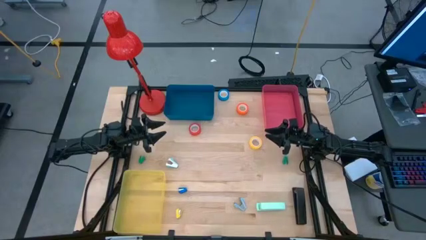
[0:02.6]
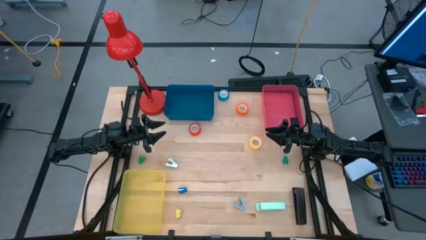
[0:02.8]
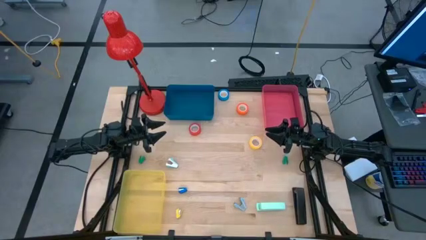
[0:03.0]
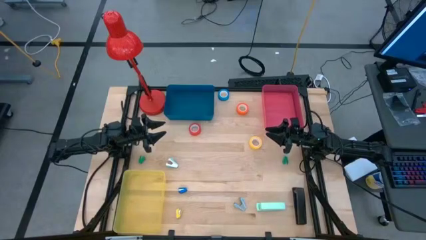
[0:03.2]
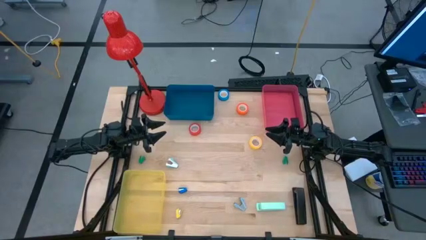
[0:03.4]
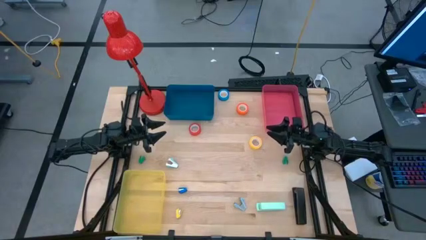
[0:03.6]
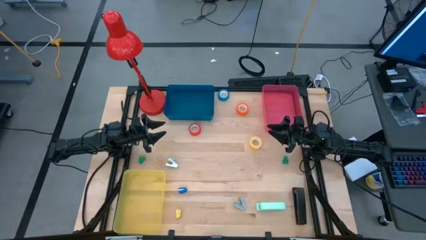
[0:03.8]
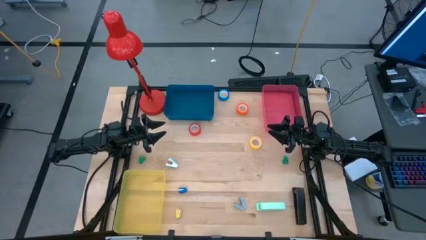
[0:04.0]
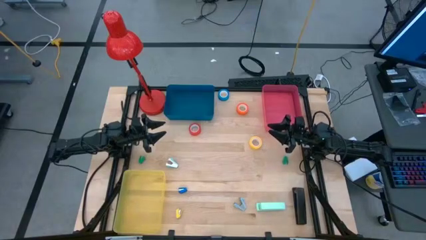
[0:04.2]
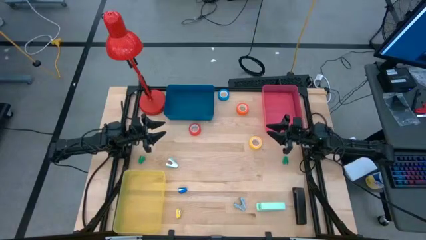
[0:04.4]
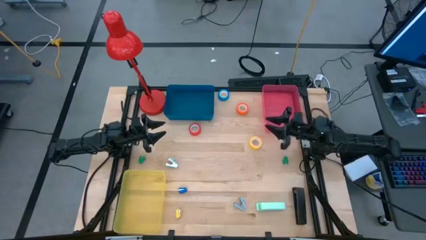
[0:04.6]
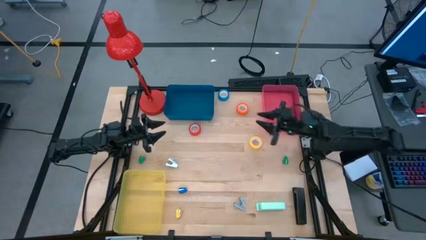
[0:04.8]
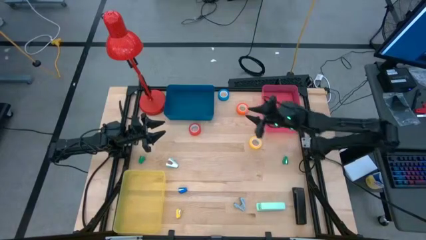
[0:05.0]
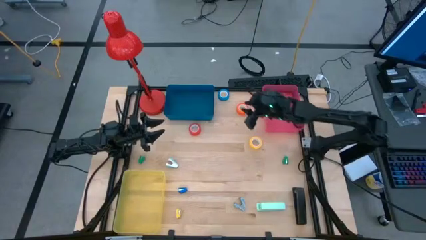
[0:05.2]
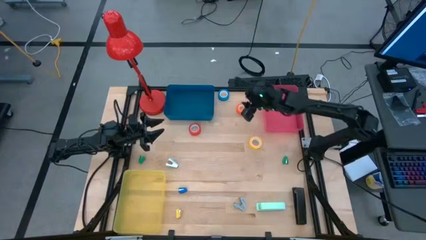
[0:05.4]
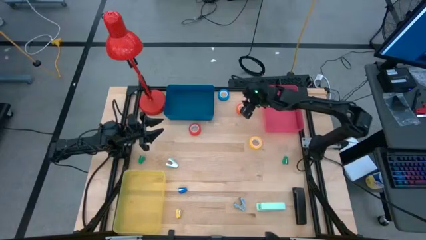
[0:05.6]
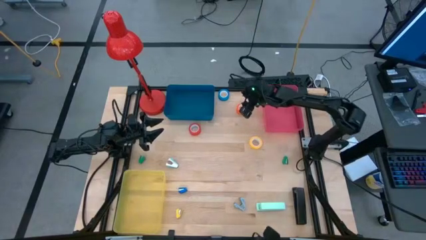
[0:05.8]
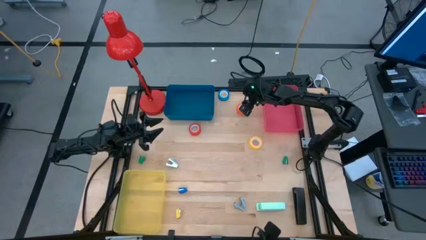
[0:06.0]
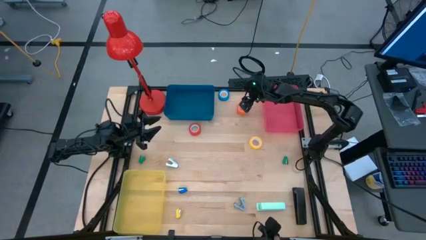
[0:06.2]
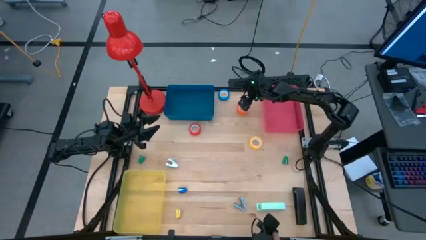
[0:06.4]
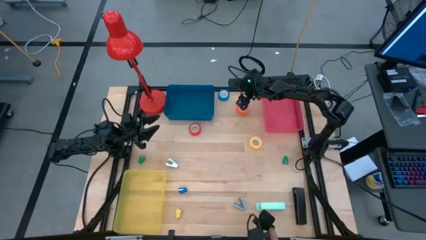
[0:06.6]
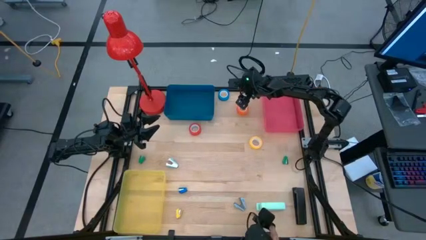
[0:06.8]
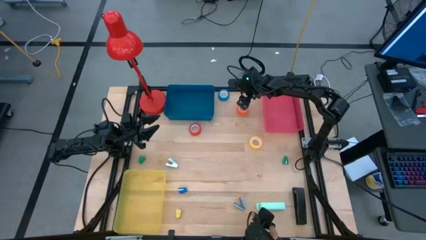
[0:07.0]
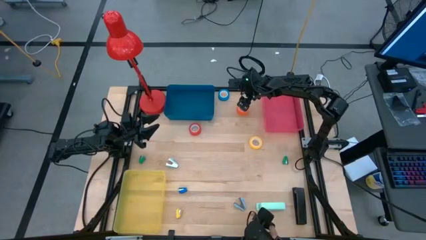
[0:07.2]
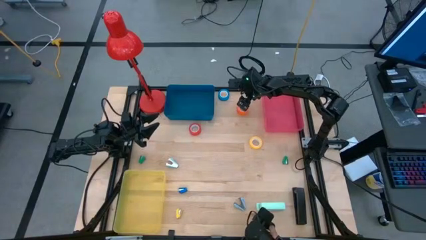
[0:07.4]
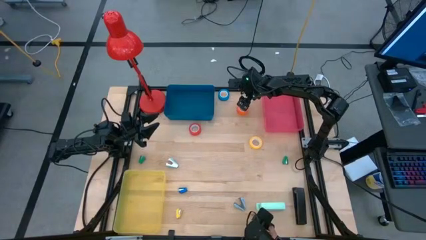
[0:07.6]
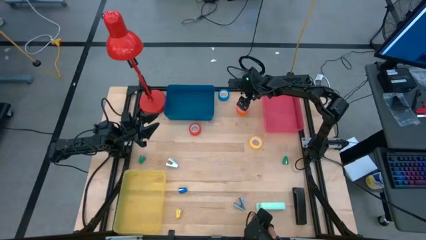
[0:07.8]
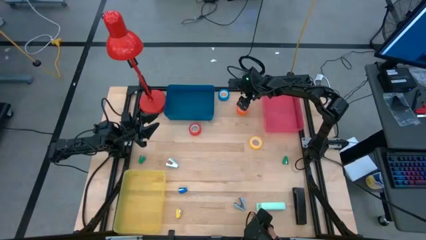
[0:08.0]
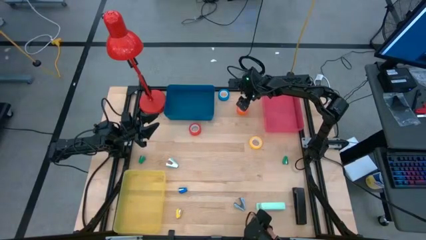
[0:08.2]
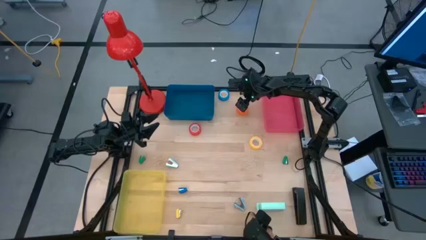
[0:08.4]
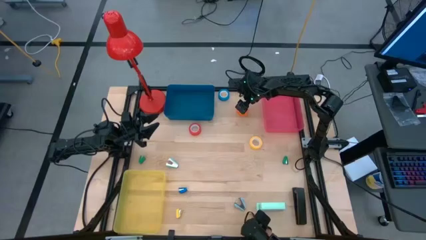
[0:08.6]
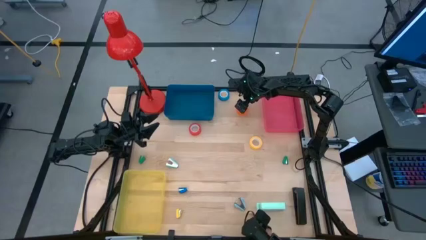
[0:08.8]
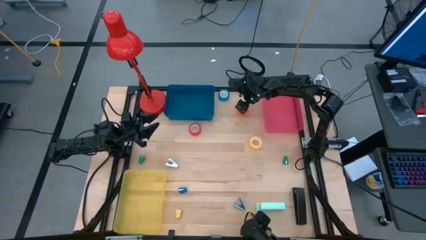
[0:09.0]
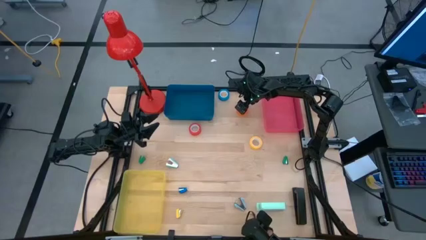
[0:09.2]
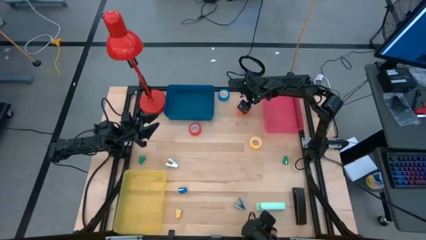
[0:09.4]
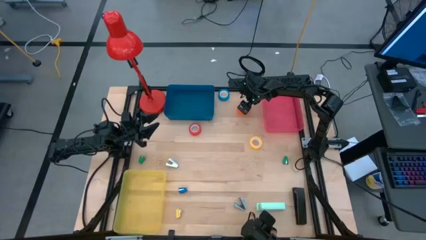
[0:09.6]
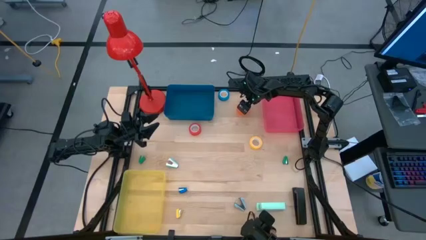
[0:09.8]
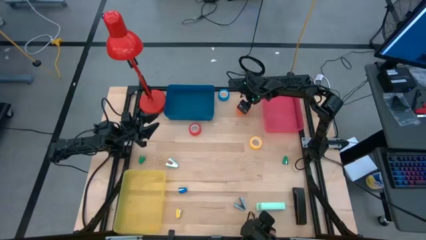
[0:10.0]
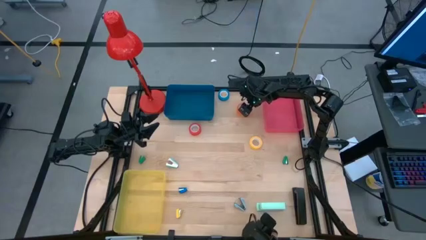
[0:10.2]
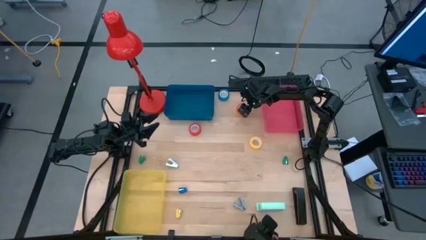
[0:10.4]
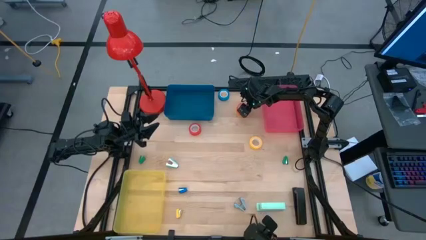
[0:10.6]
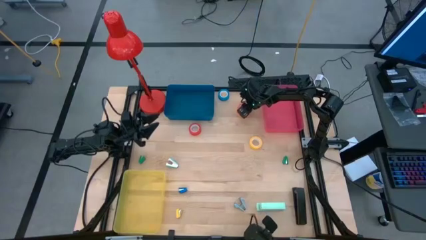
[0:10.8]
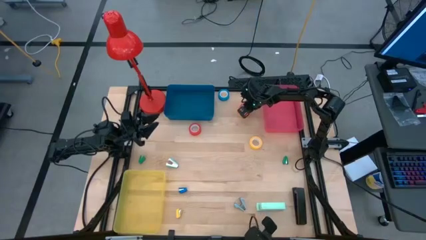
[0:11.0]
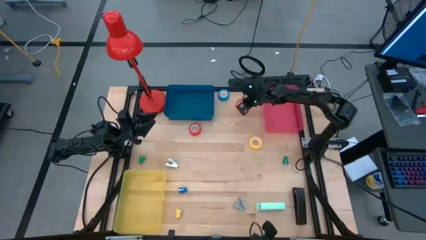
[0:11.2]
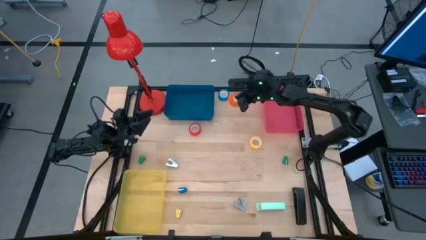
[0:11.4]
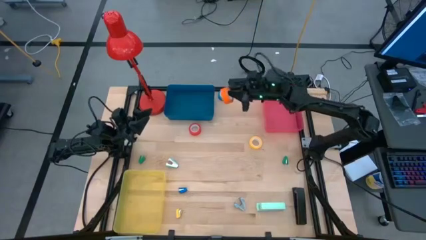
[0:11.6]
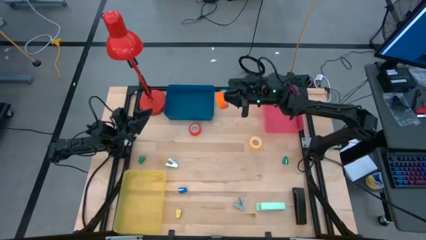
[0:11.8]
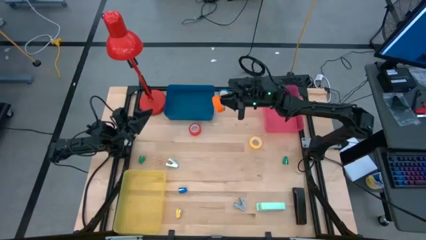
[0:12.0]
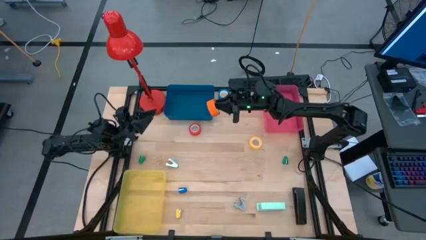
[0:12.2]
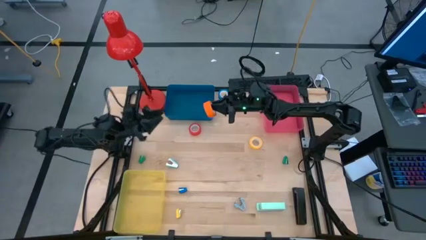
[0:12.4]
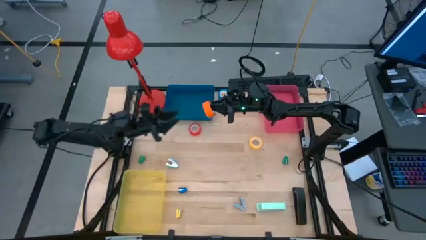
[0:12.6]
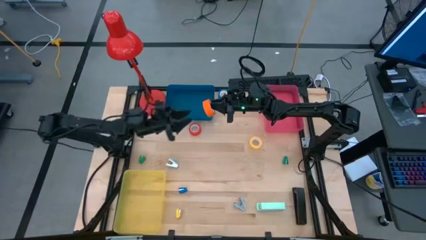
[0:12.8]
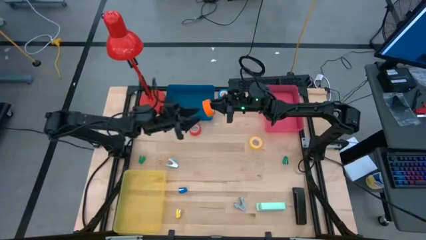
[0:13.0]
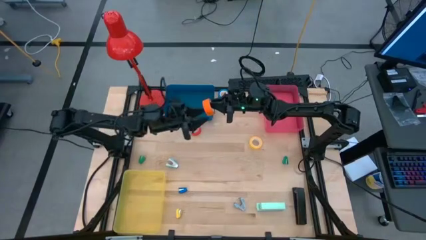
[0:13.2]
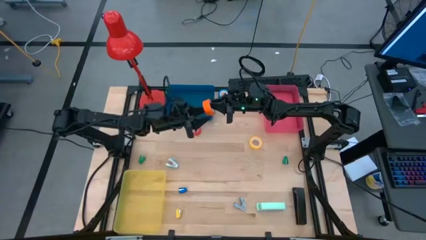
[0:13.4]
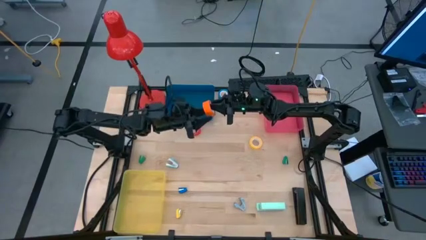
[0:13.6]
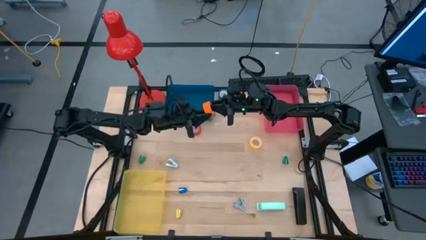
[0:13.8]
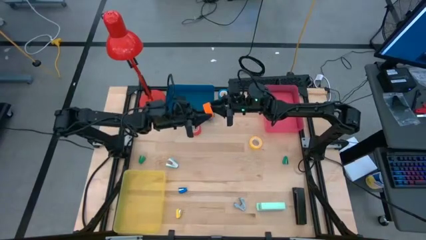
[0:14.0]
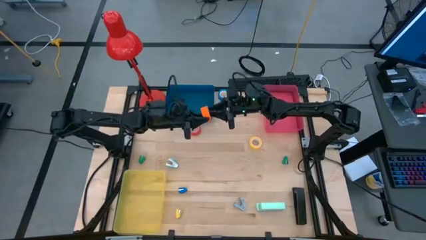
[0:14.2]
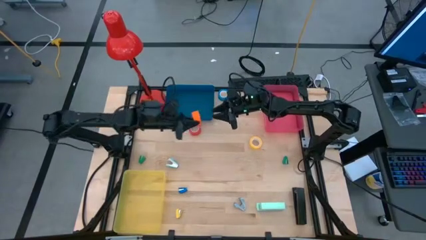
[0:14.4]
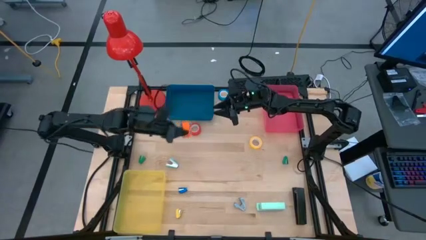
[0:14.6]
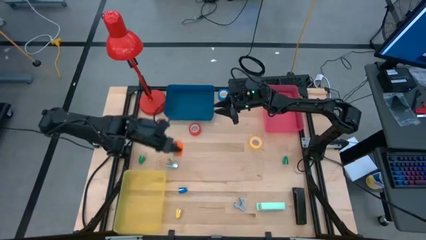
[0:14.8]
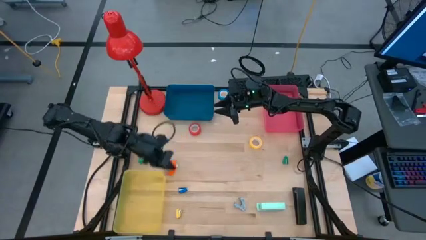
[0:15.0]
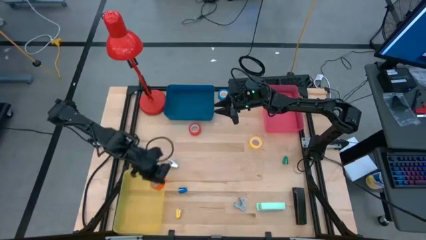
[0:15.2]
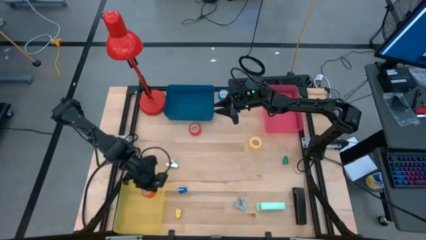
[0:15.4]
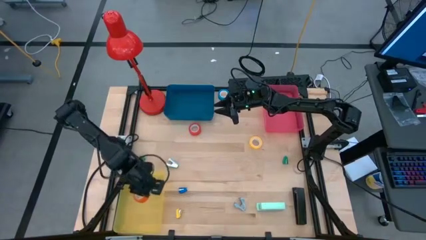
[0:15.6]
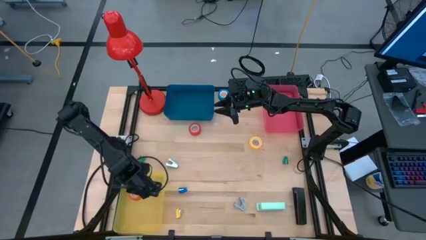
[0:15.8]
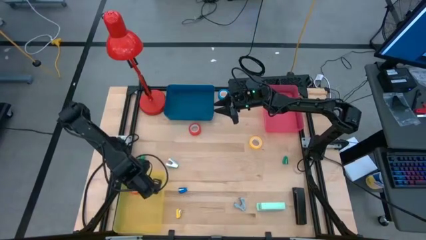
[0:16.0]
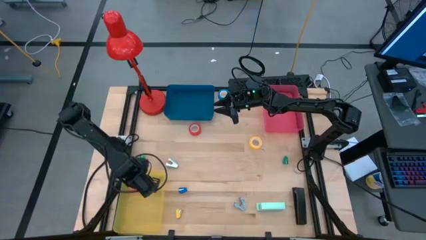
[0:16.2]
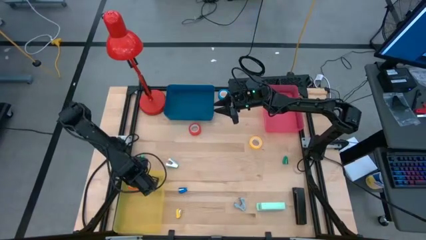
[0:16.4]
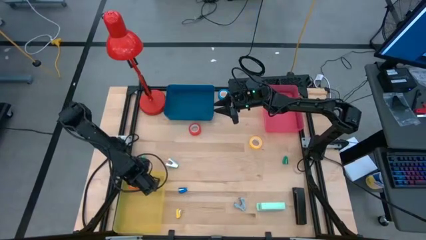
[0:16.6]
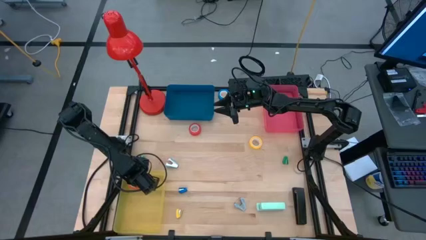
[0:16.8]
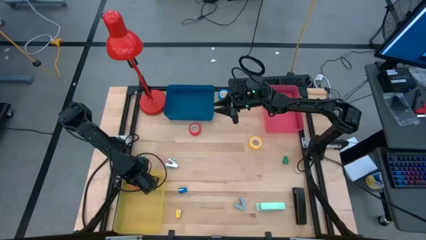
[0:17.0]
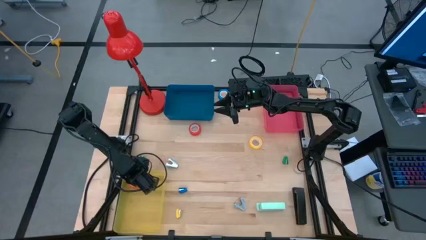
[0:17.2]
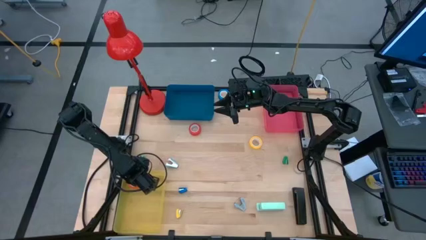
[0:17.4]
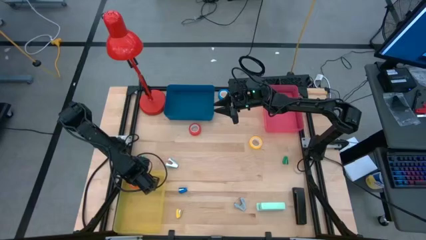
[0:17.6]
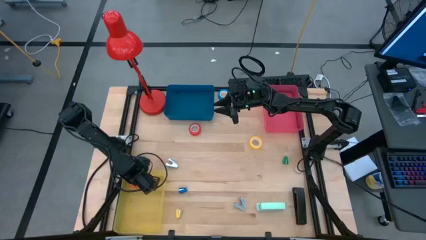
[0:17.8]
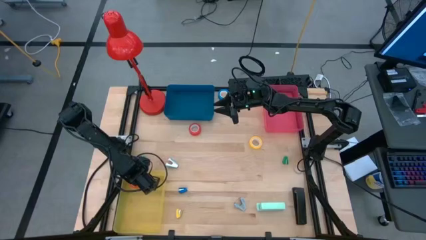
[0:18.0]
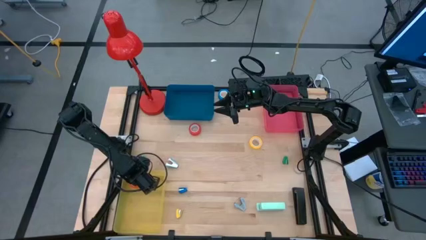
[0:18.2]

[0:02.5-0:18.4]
Task: Pick and place Stapler, Stapler remover, tape
Put the orange tape into the yellow bin
